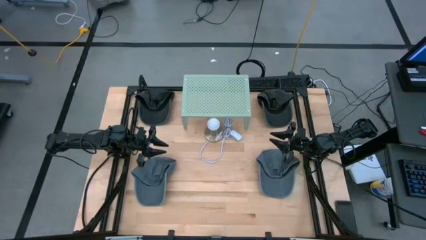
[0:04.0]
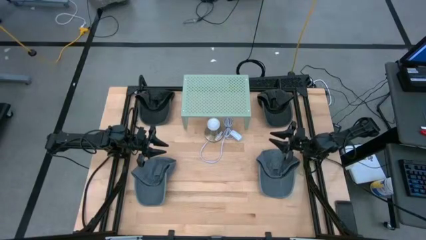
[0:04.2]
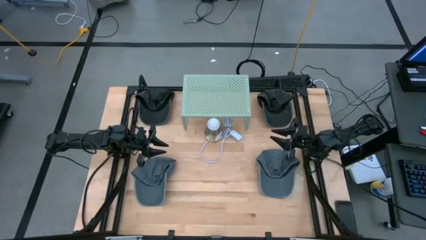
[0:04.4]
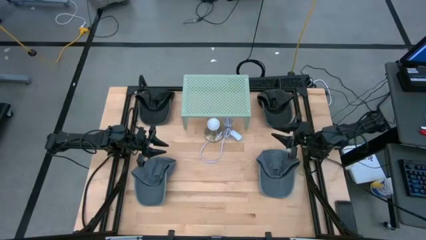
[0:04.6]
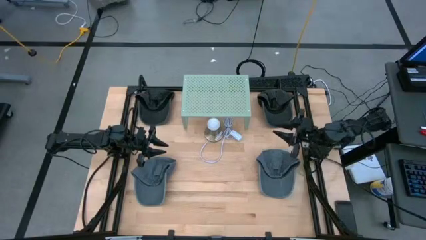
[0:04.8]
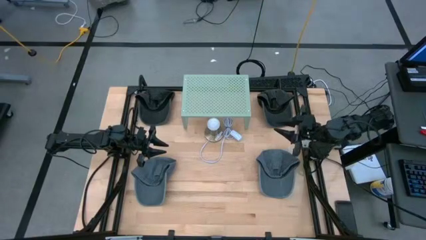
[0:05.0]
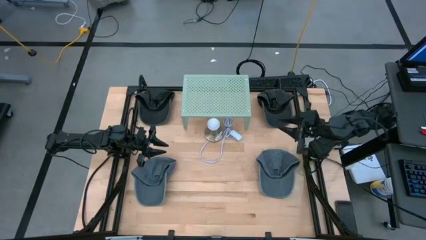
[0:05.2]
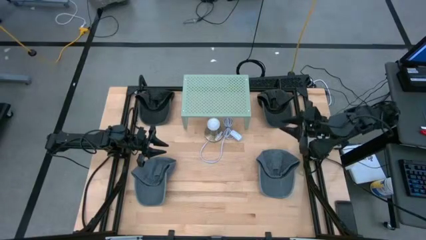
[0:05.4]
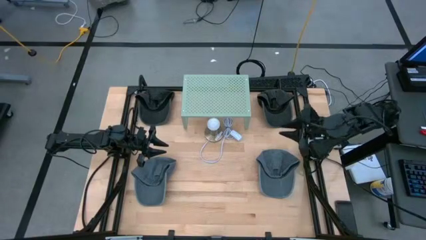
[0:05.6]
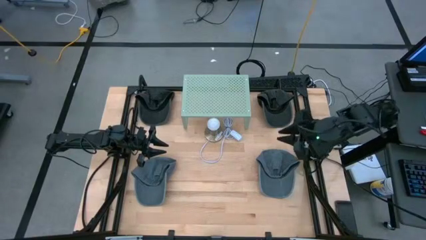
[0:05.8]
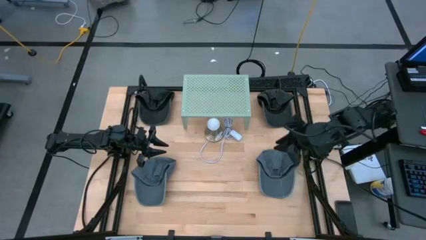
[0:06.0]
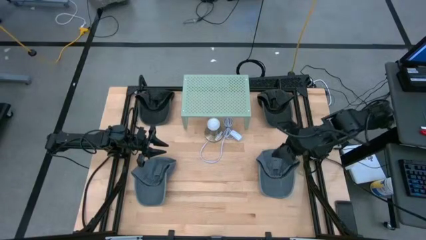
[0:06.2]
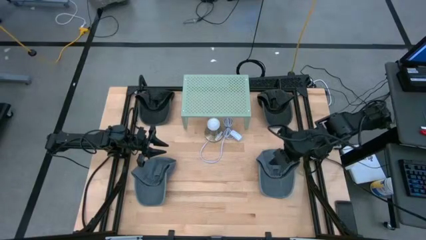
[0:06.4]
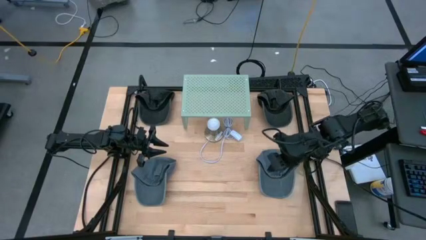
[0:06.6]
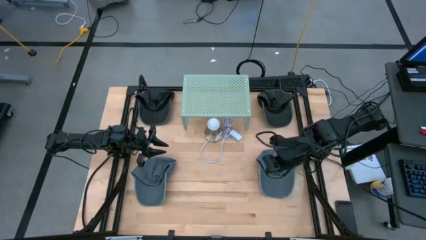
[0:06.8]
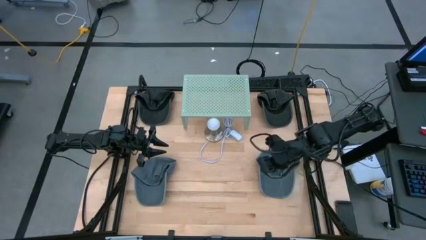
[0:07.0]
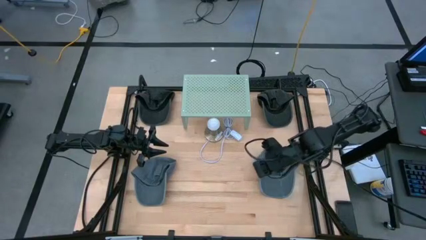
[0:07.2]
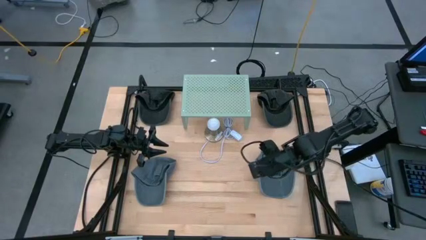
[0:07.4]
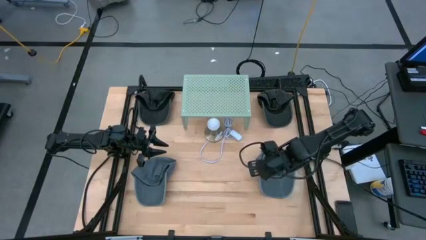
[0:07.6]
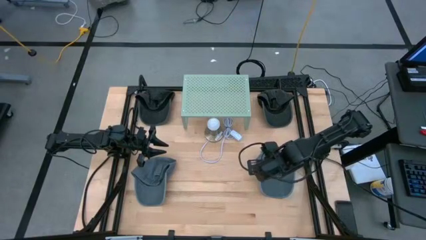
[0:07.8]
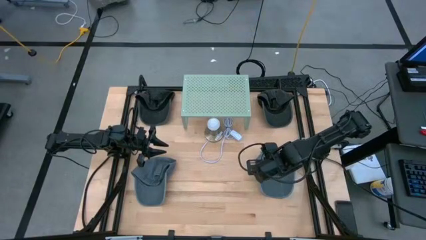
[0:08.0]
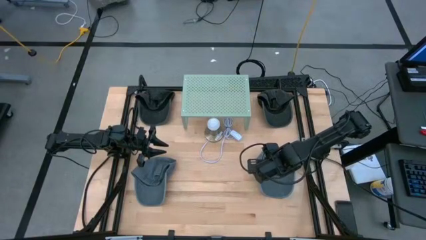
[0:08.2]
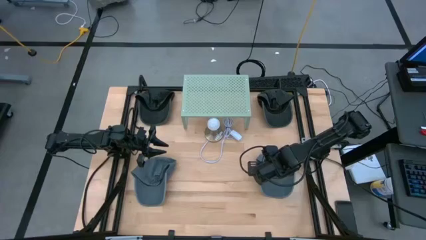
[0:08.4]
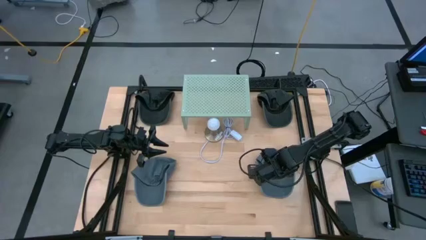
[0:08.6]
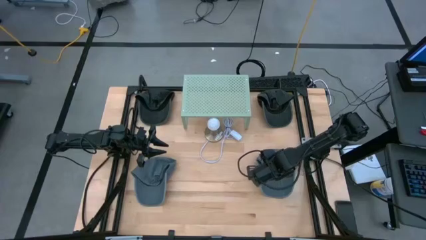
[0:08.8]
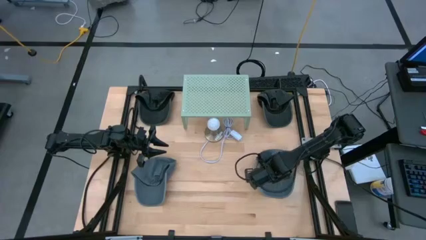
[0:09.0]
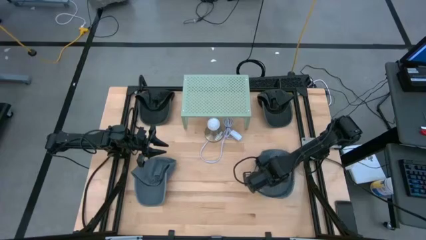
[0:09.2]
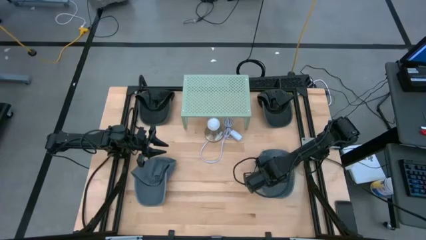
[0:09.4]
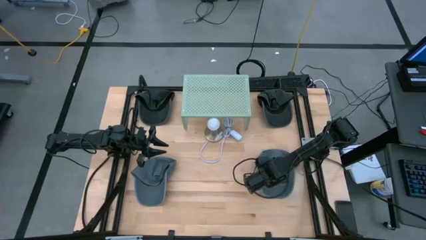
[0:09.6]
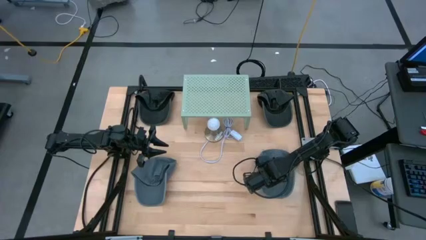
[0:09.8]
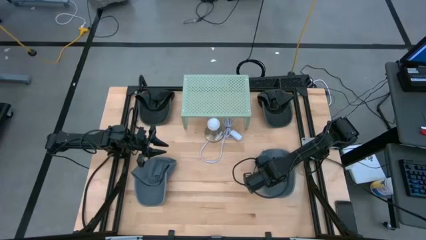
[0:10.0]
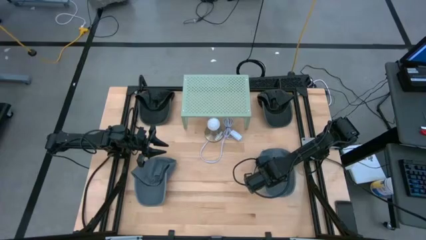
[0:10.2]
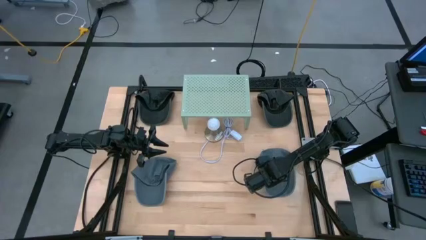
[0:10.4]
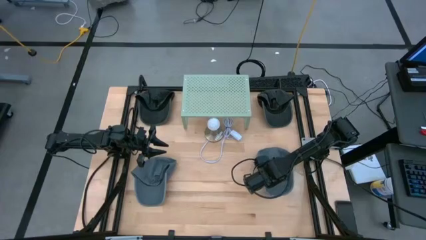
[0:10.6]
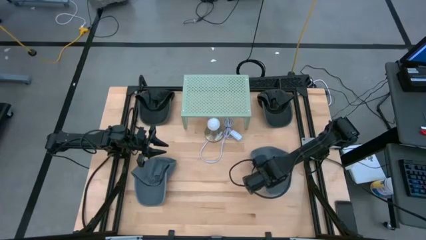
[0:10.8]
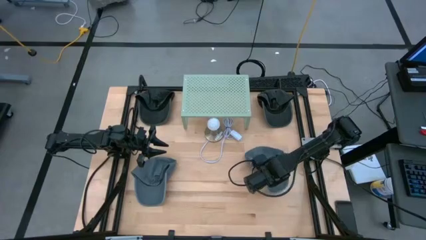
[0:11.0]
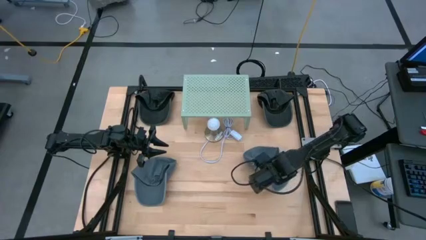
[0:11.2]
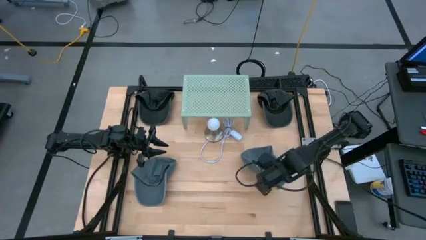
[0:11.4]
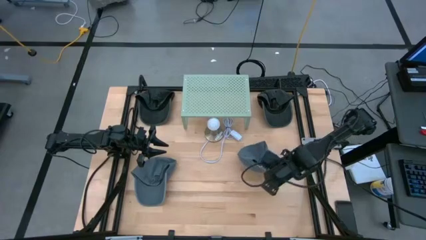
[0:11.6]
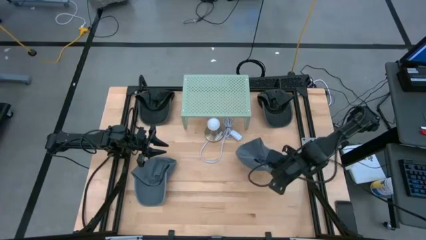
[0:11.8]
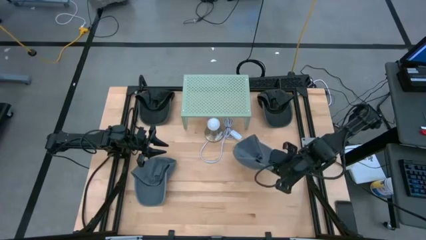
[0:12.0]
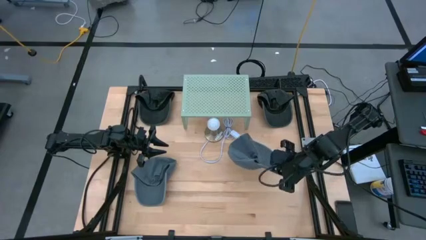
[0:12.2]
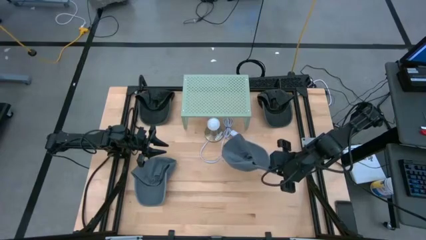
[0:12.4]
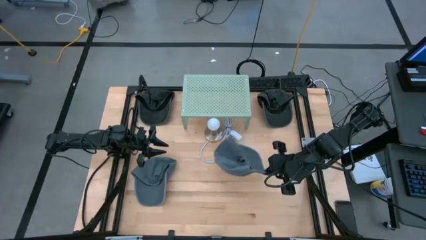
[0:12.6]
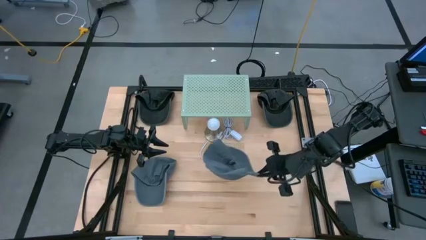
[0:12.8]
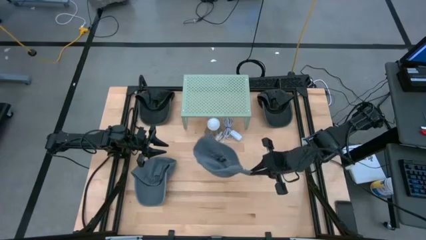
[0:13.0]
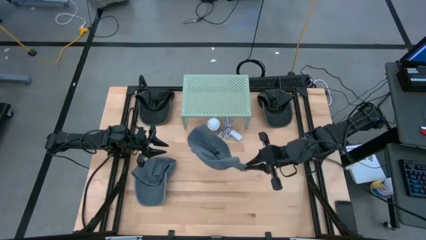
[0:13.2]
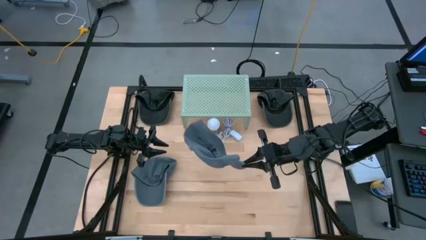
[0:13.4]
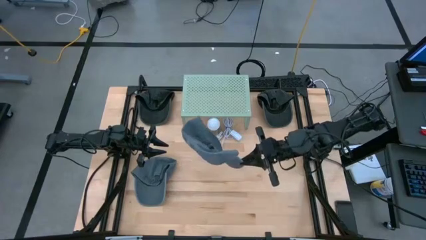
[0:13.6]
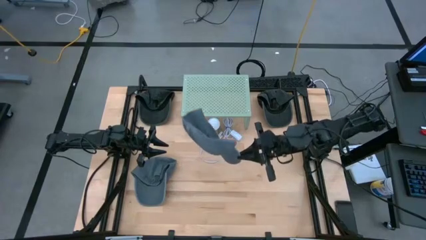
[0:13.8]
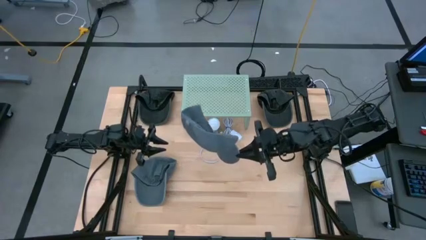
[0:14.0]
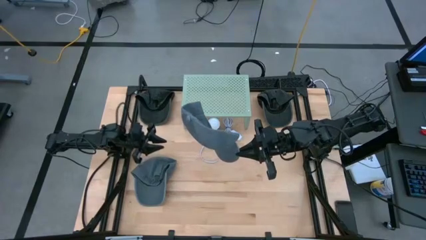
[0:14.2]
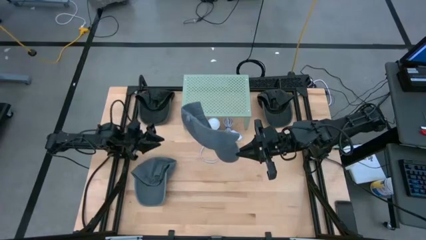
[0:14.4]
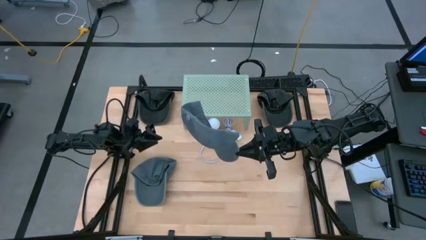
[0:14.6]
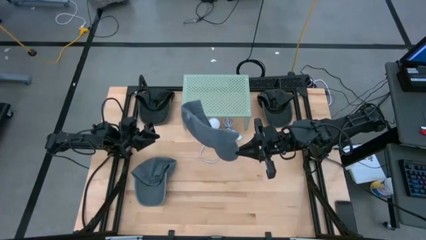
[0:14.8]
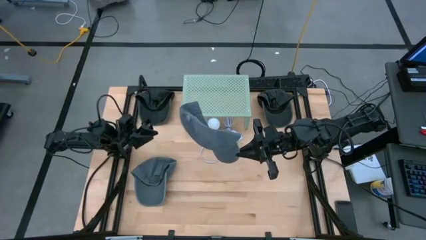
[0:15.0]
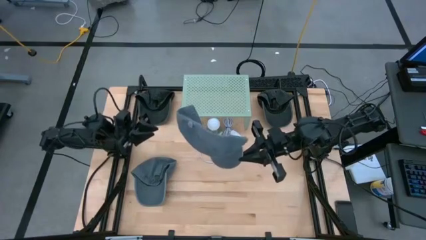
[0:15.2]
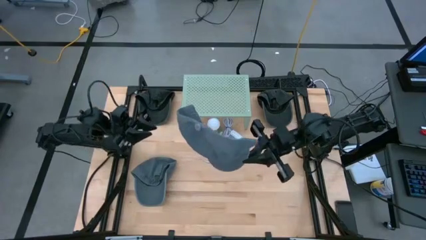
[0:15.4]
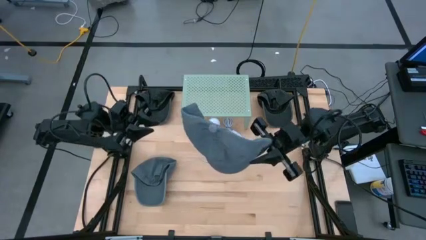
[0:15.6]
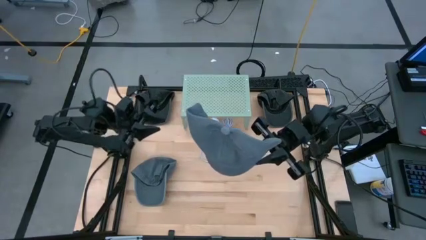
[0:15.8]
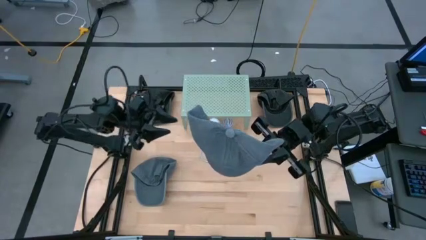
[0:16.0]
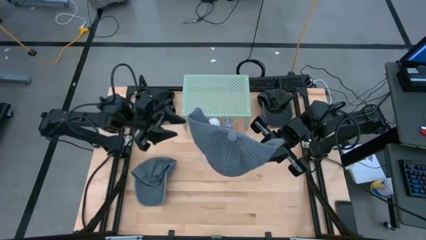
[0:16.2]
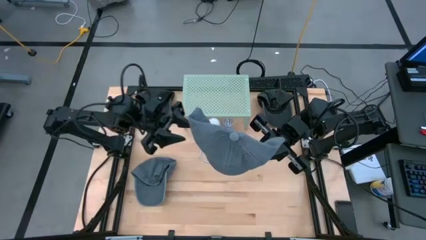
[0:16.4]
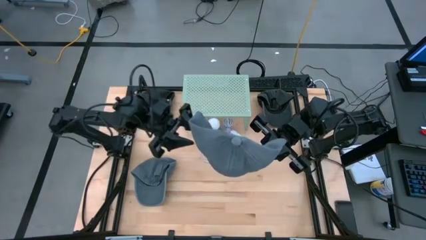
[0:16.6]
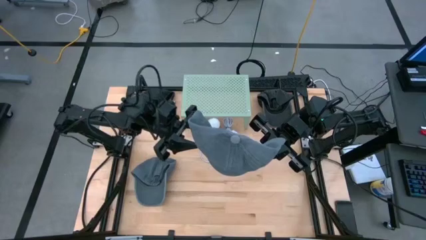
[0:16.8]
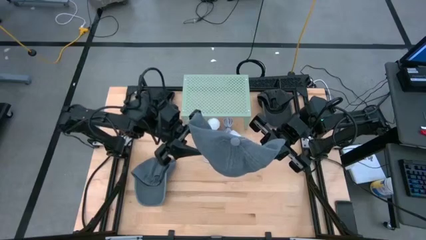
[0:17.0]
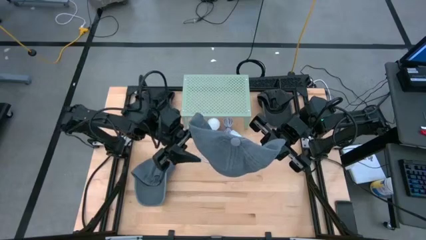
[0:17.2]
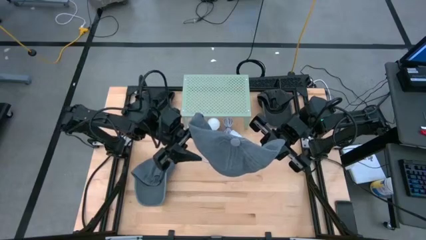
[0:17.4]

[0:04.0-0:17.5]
Task: Pick & Place hat
Put the right gray cap on the shelf
